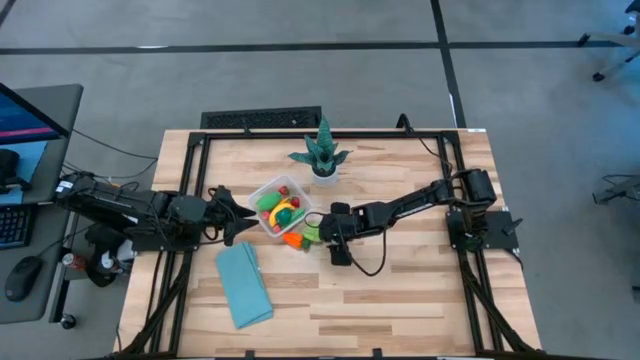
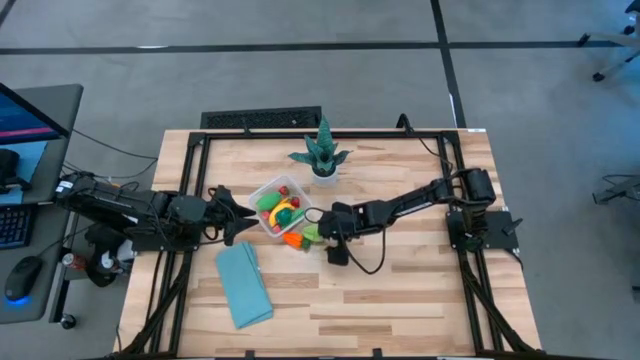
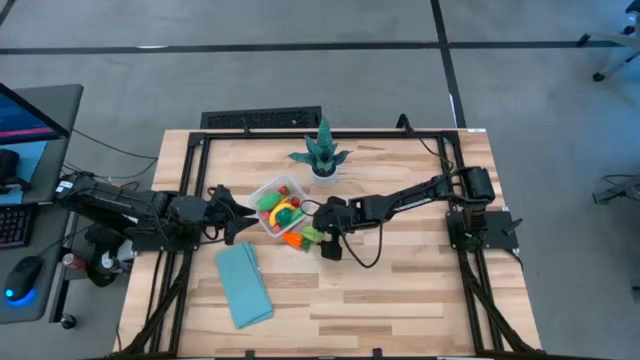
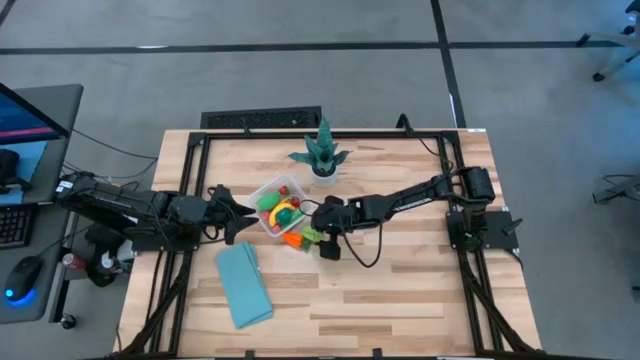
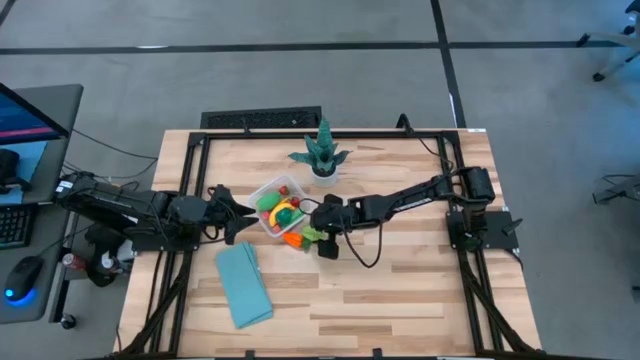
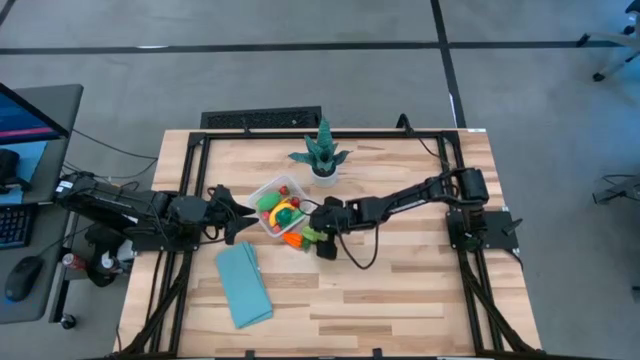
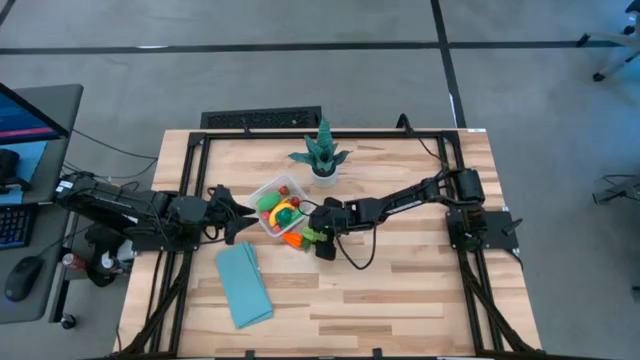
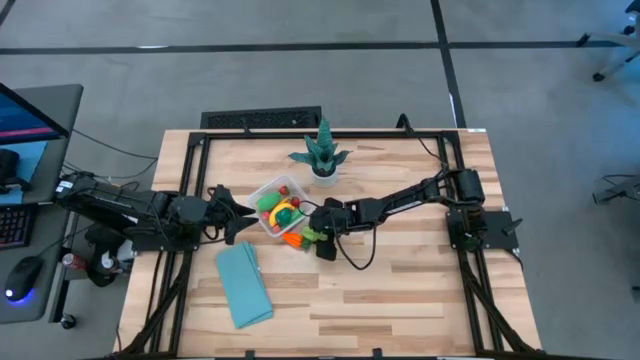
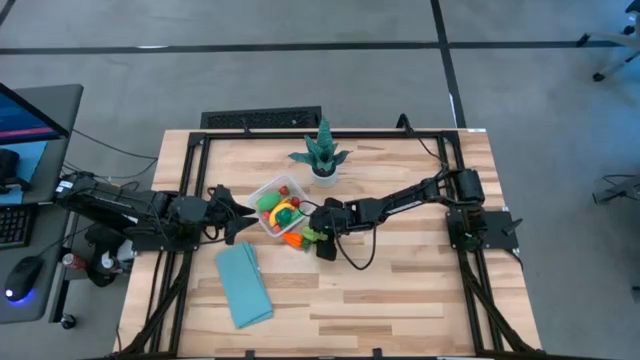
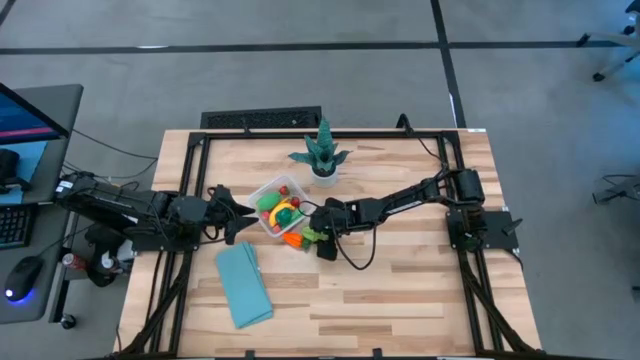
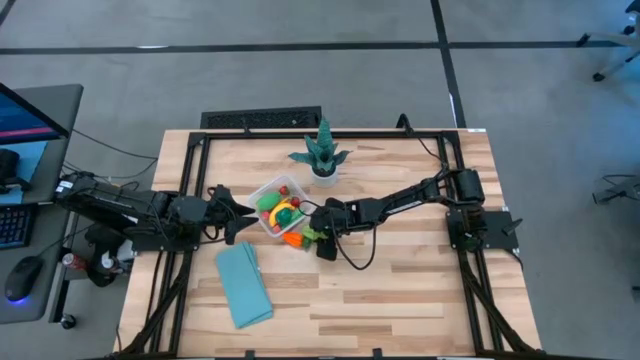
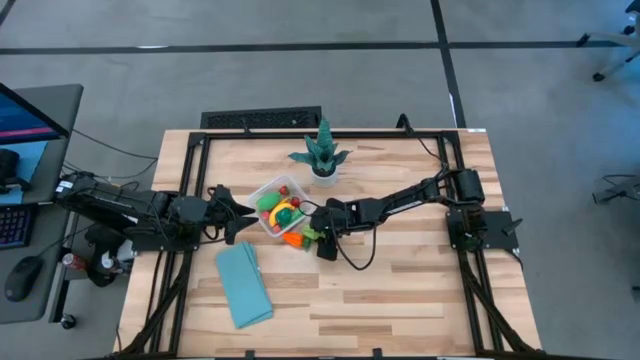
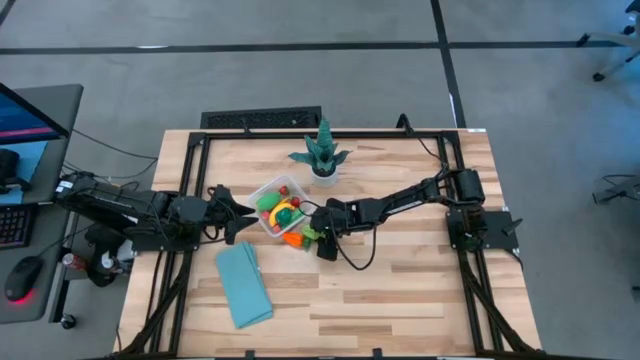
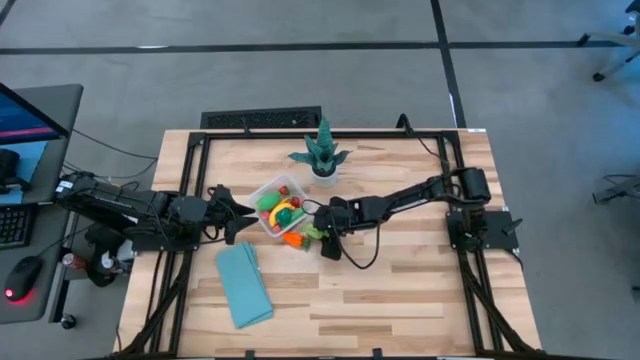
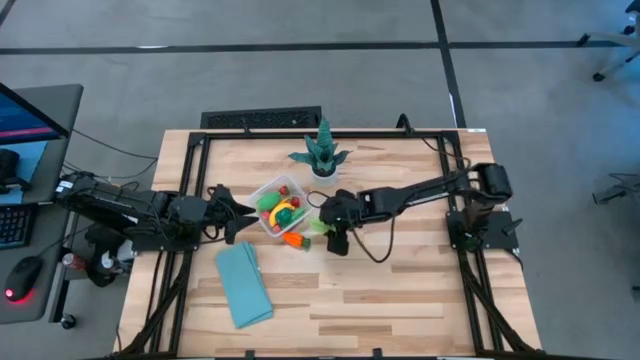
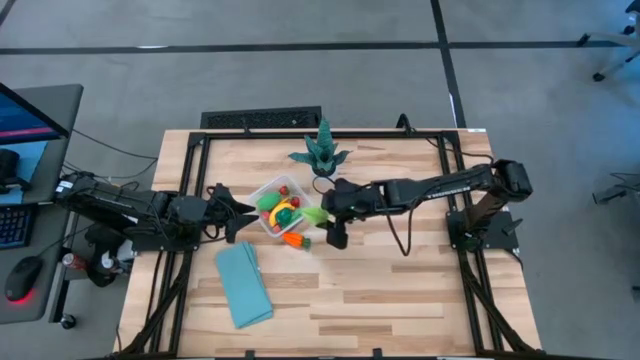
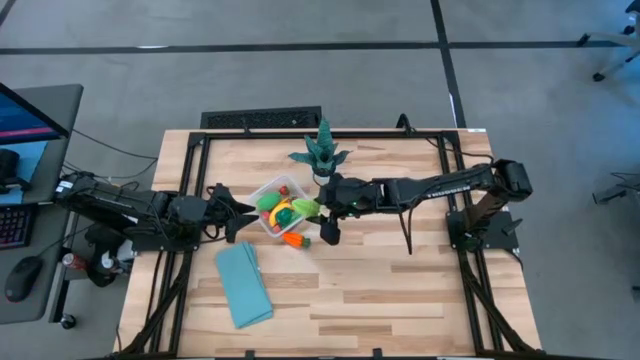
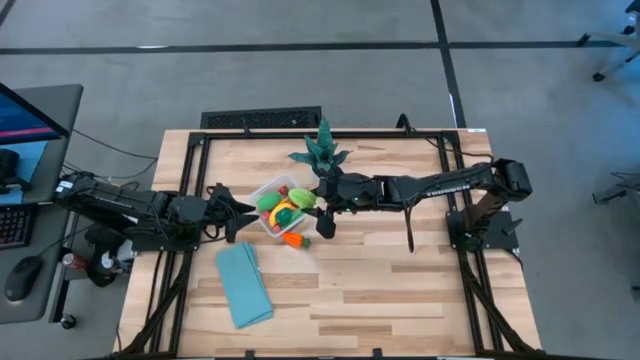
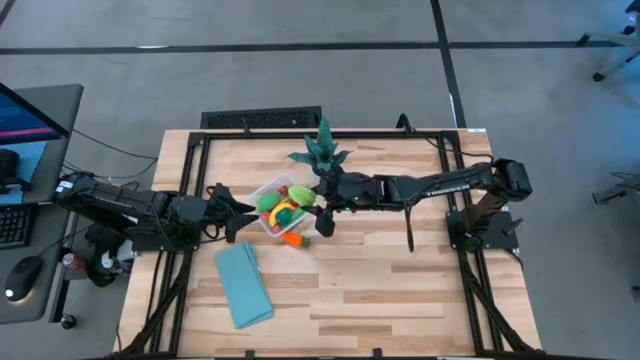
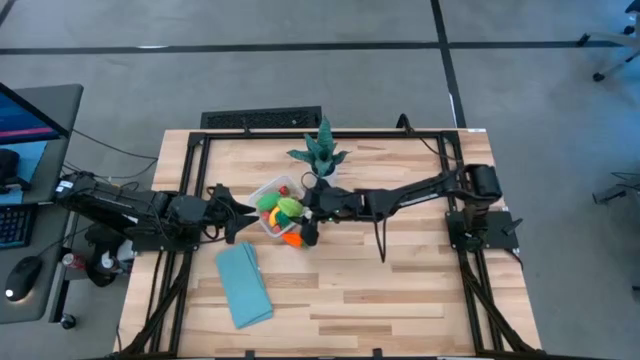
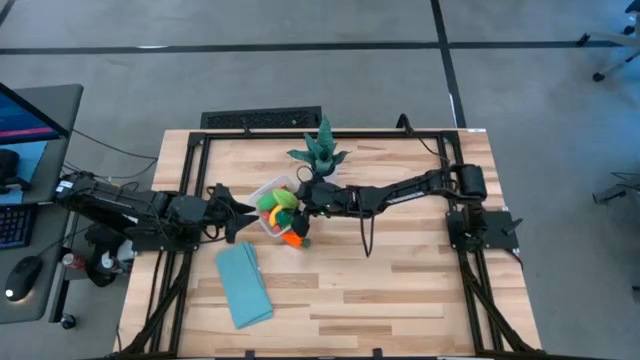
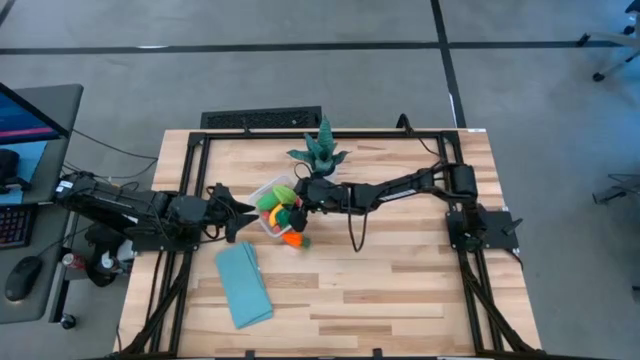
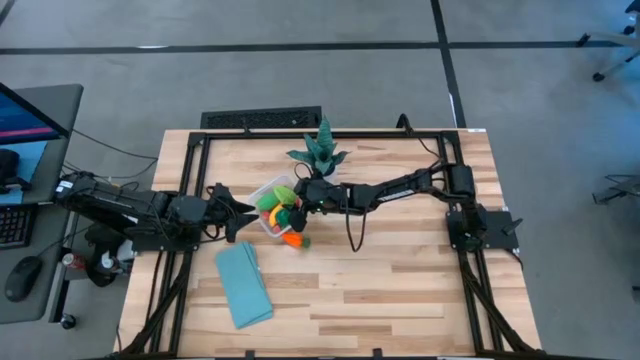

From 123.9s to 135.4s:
Task: Pick and placing Produce into tupperware
Put the green star fruit into the transparent container

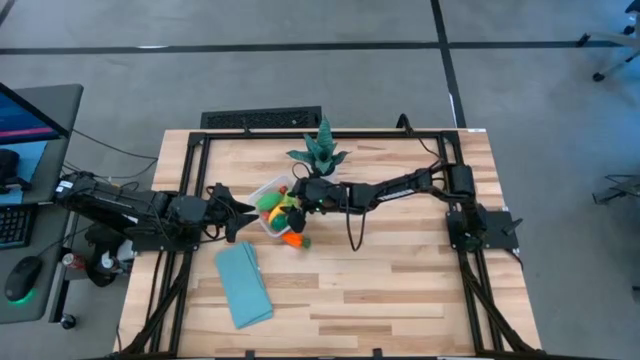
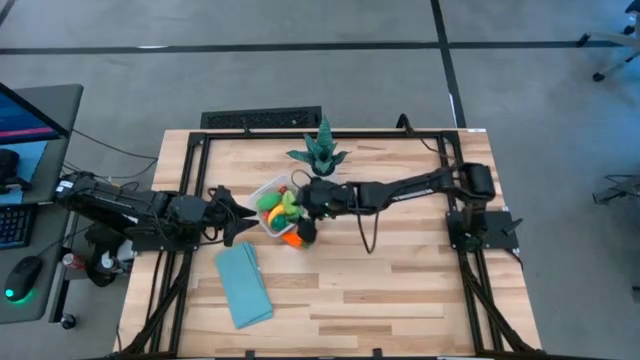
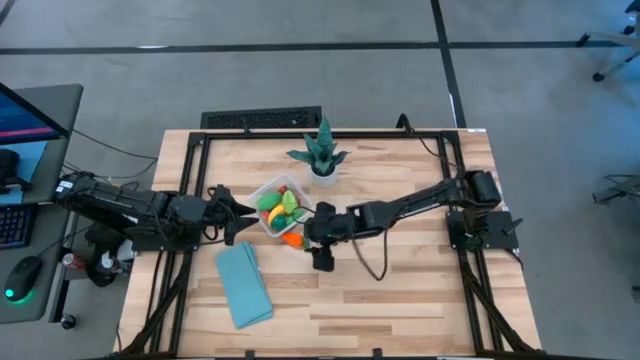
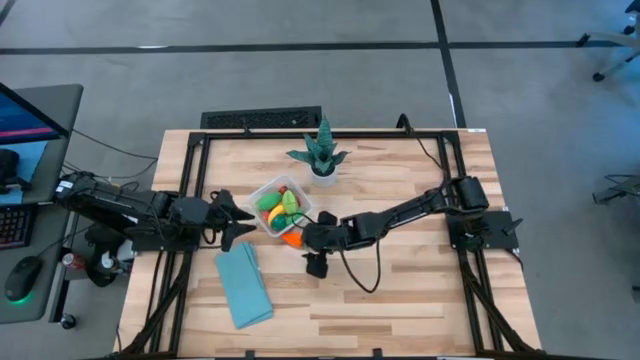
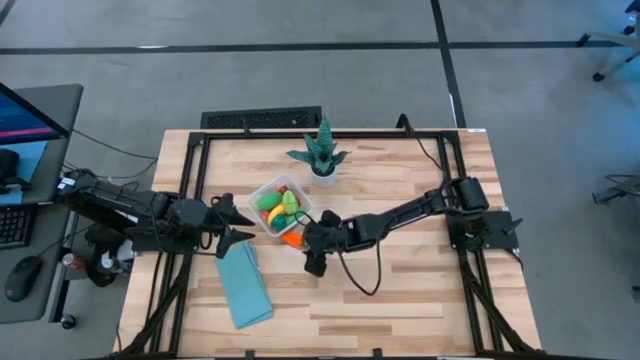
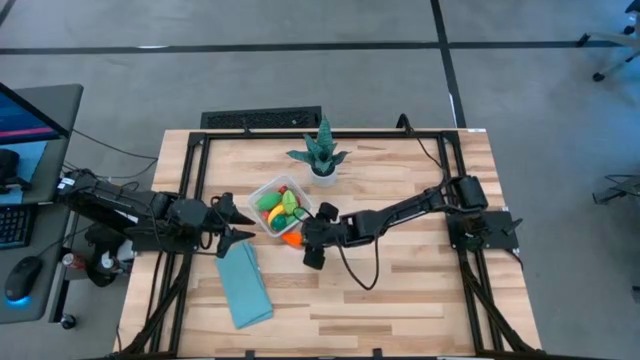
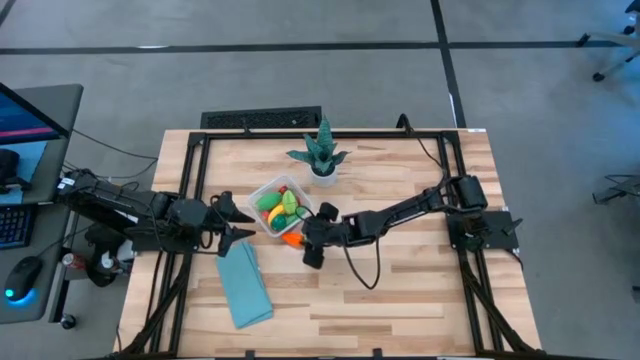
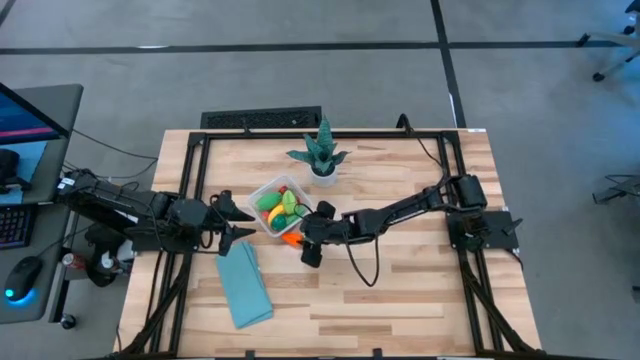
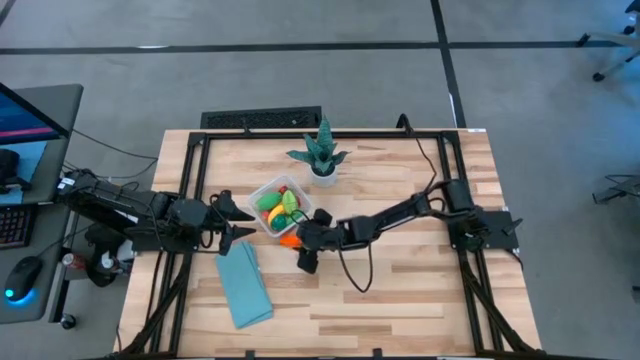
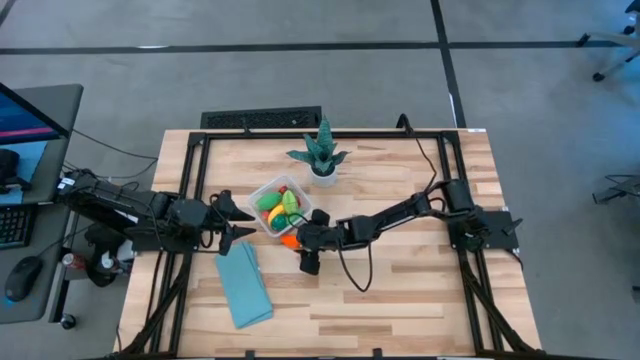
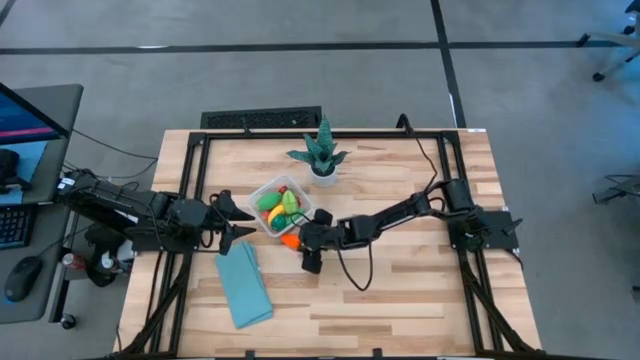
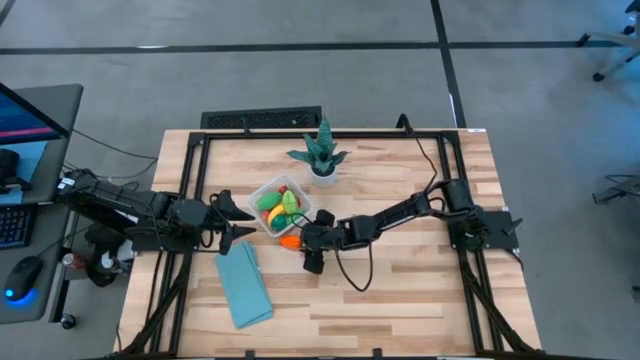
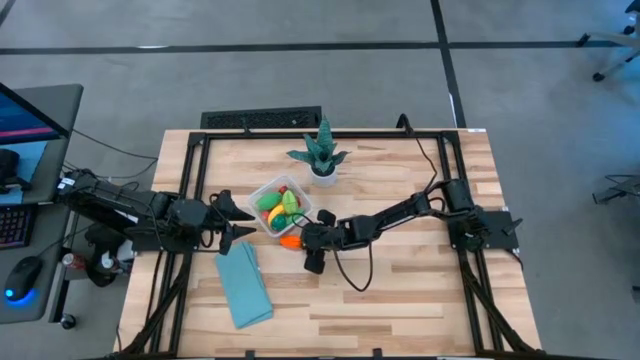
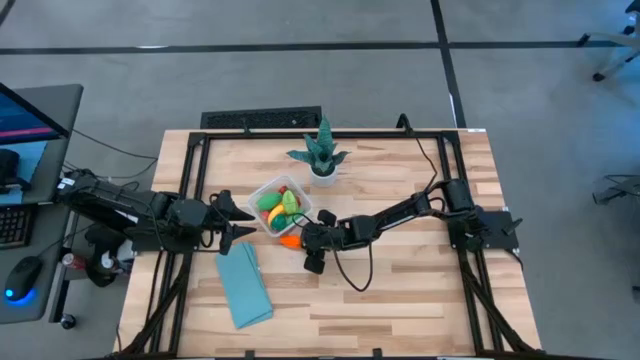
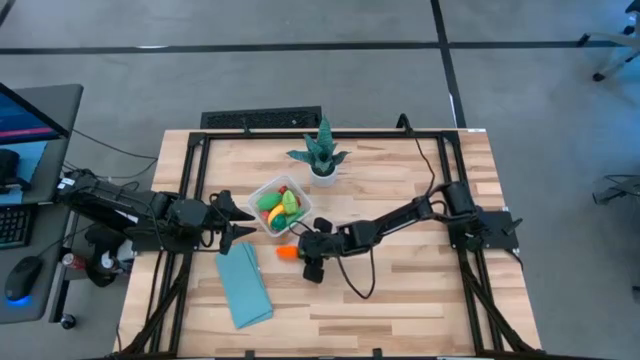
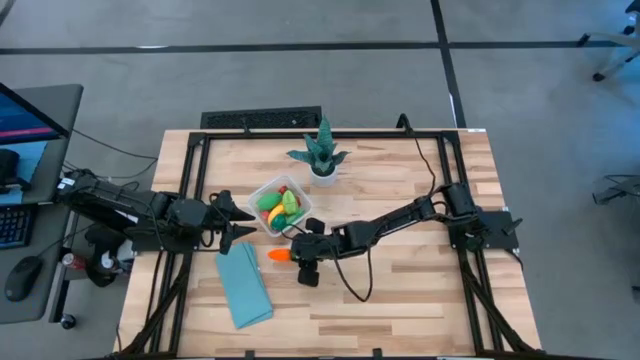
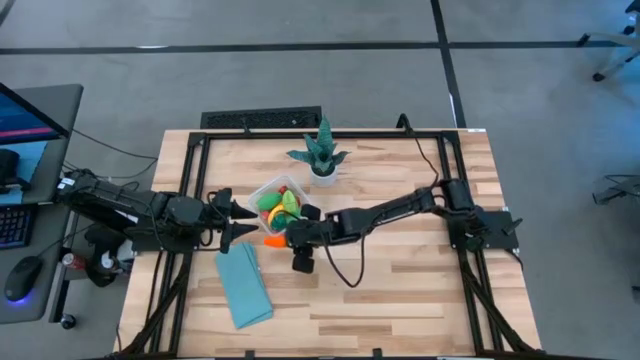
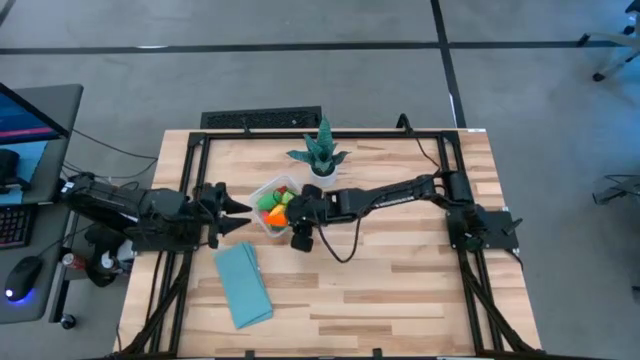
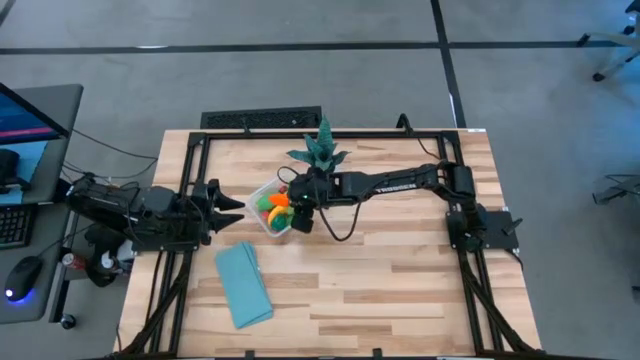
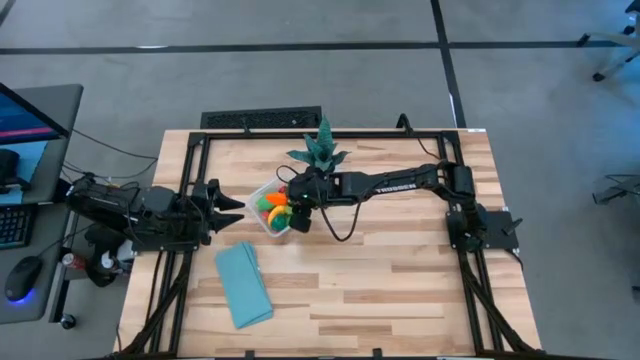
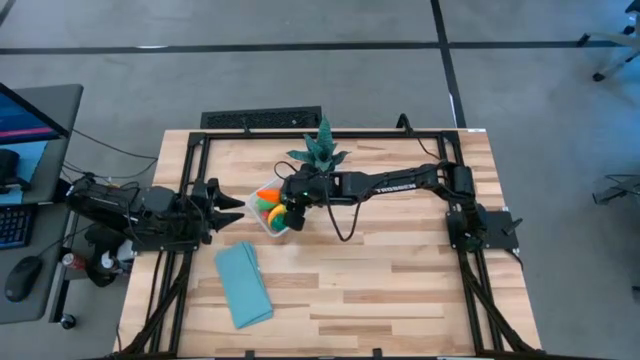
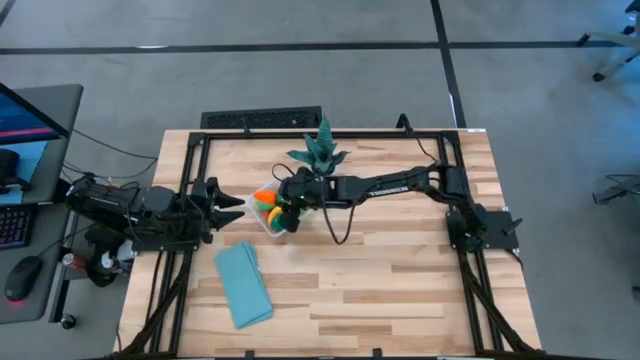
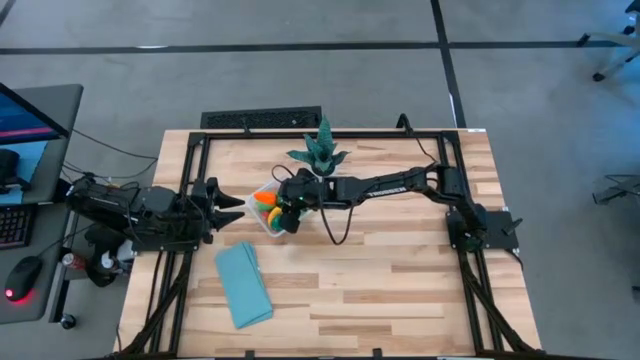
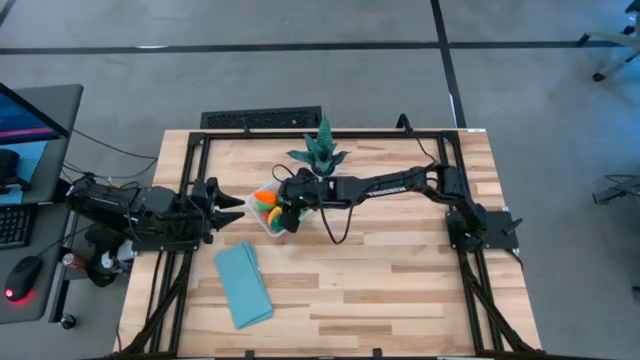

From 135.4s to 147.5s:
Put the orange carrot into the transparent container
